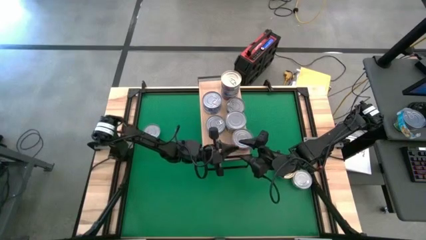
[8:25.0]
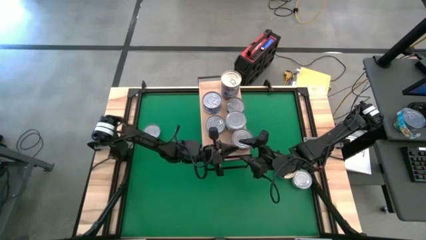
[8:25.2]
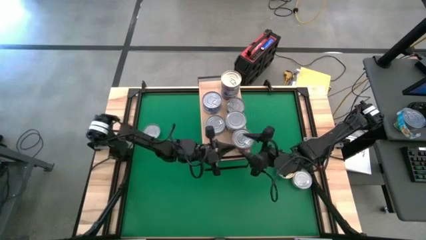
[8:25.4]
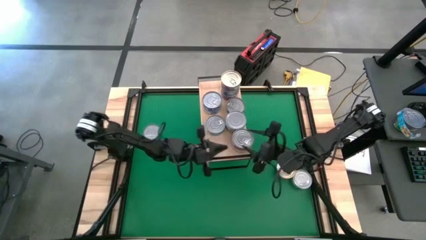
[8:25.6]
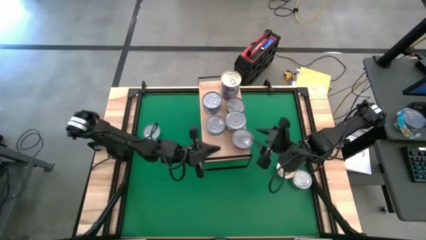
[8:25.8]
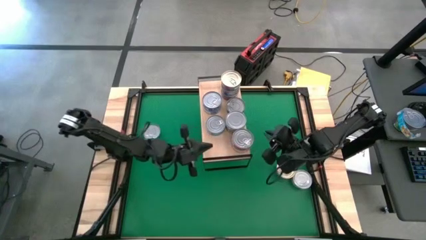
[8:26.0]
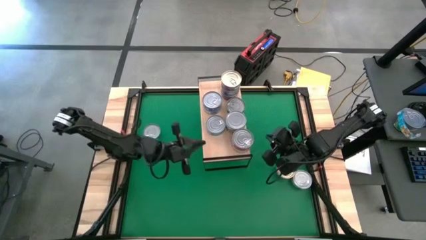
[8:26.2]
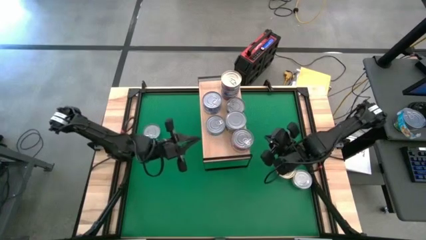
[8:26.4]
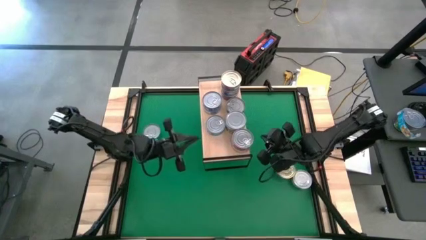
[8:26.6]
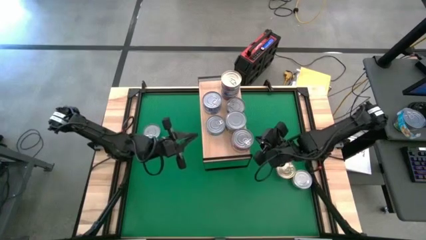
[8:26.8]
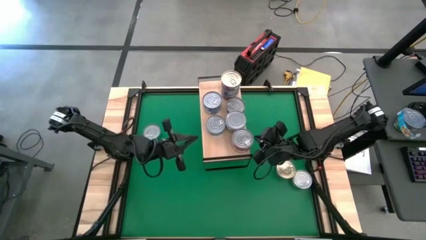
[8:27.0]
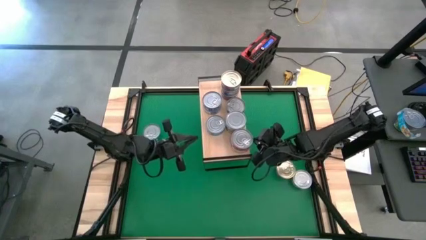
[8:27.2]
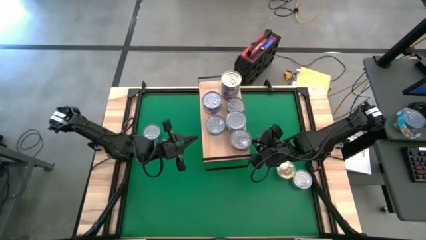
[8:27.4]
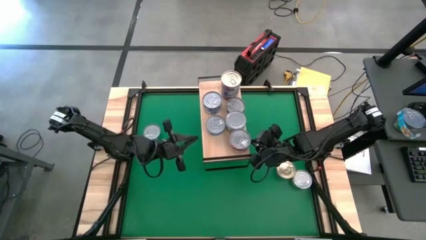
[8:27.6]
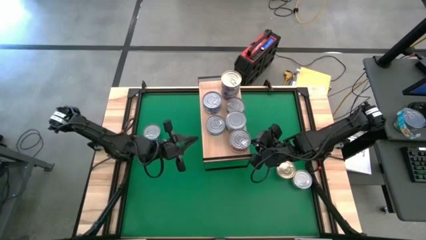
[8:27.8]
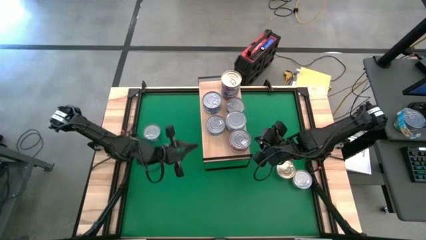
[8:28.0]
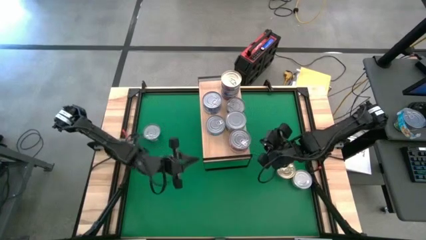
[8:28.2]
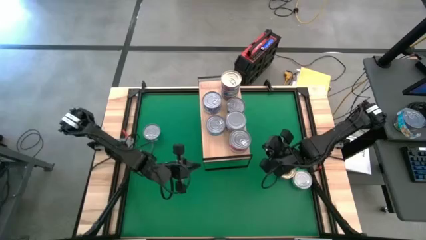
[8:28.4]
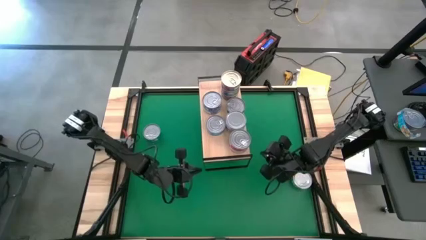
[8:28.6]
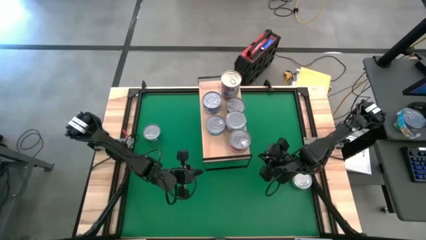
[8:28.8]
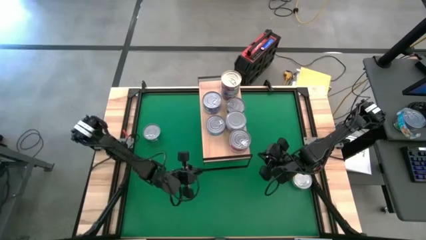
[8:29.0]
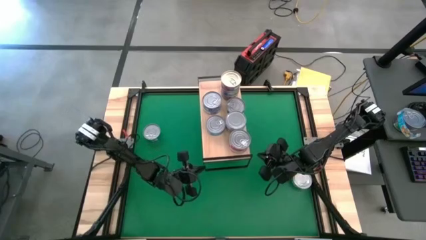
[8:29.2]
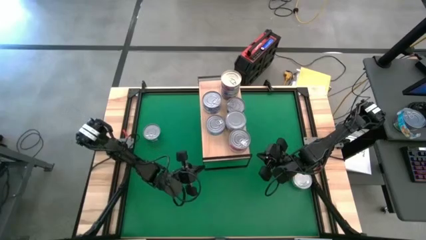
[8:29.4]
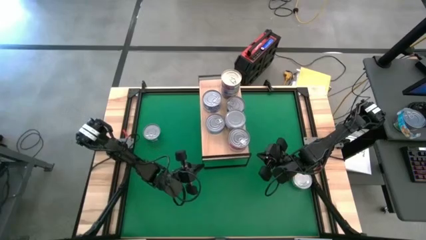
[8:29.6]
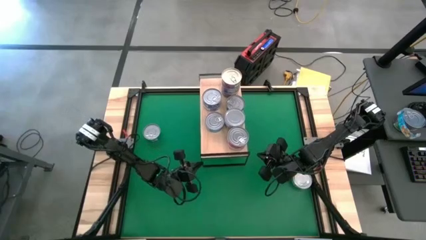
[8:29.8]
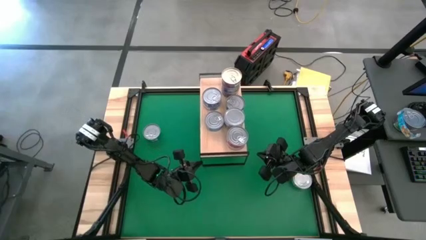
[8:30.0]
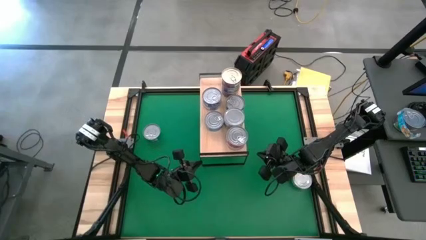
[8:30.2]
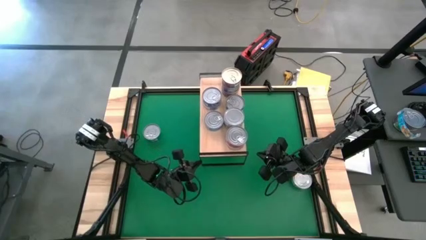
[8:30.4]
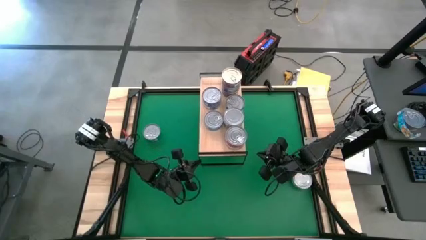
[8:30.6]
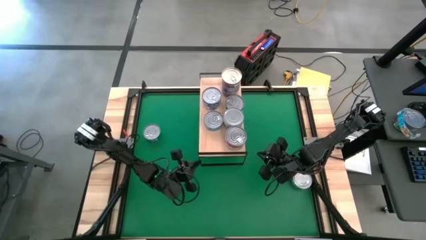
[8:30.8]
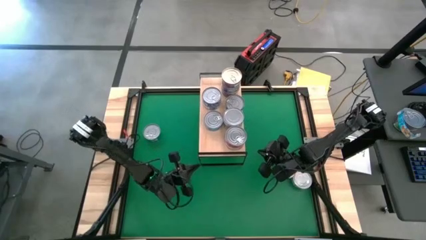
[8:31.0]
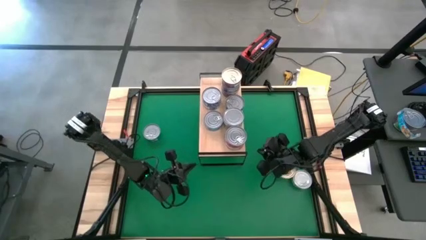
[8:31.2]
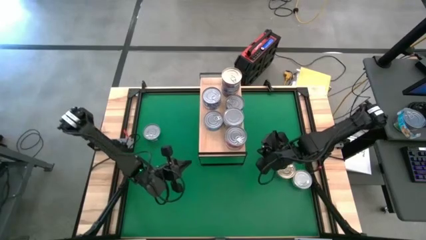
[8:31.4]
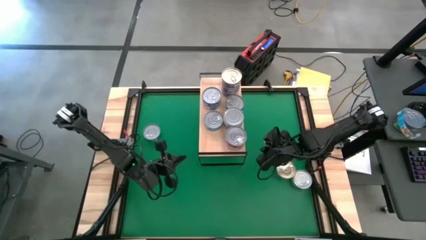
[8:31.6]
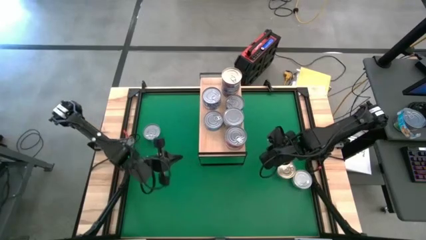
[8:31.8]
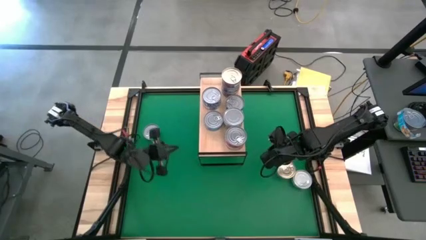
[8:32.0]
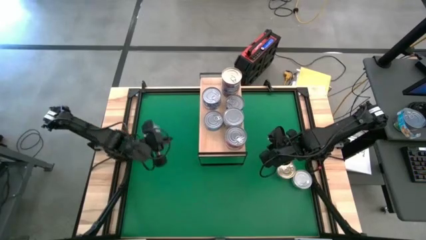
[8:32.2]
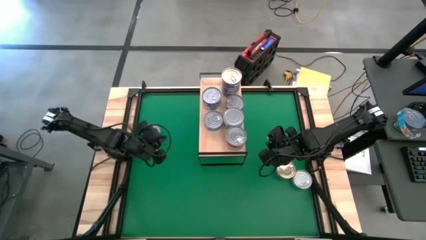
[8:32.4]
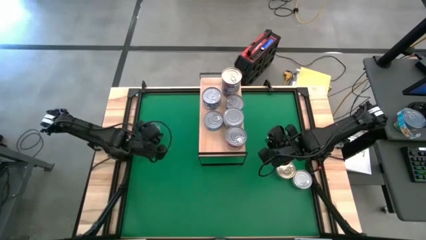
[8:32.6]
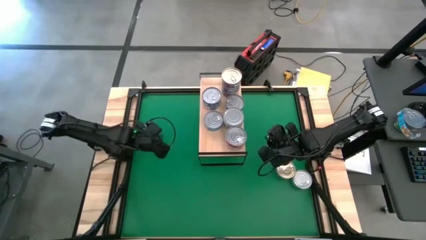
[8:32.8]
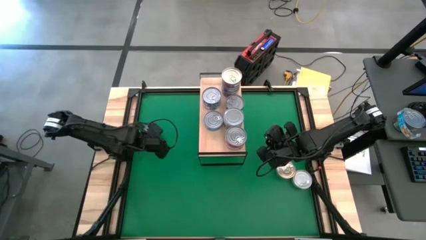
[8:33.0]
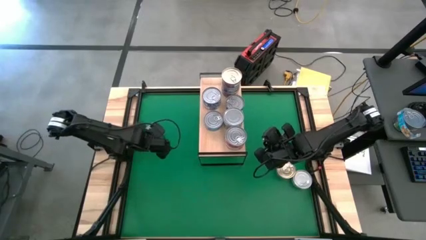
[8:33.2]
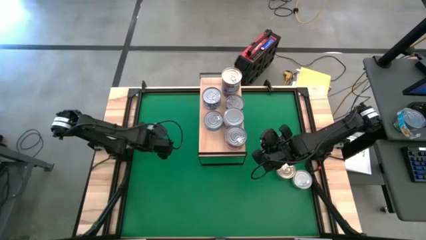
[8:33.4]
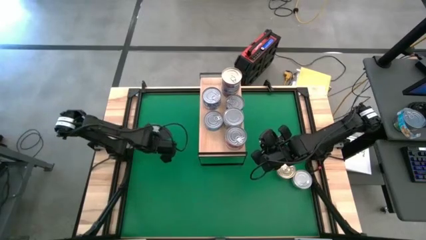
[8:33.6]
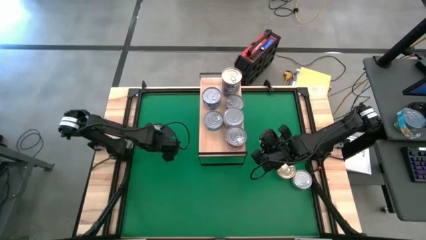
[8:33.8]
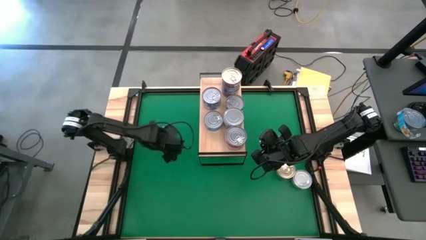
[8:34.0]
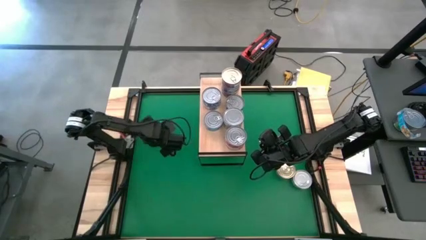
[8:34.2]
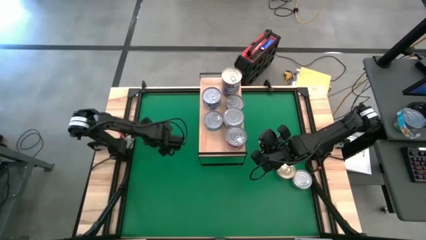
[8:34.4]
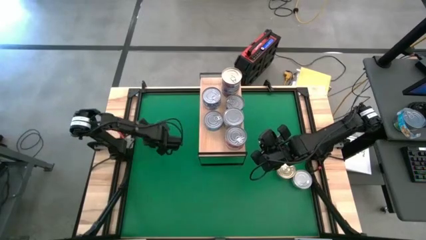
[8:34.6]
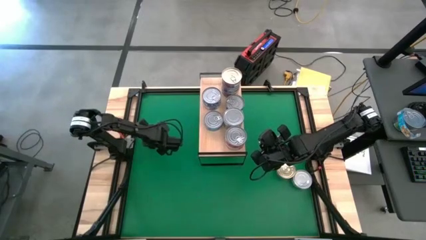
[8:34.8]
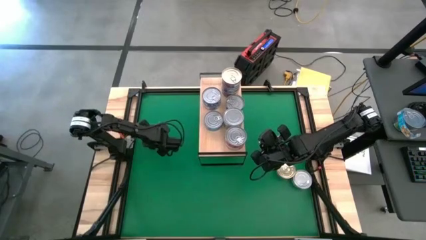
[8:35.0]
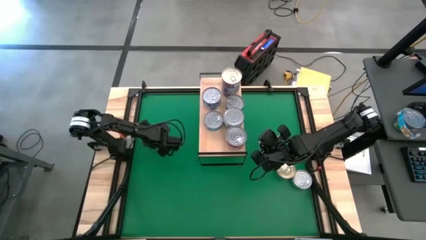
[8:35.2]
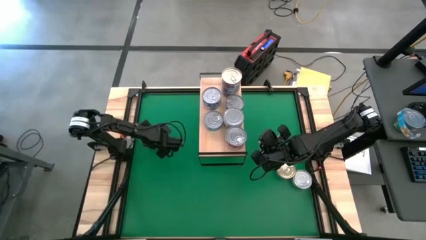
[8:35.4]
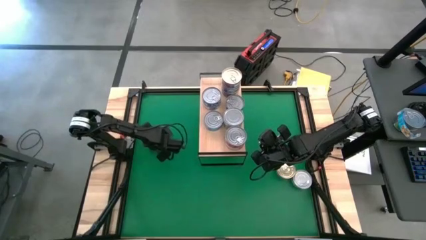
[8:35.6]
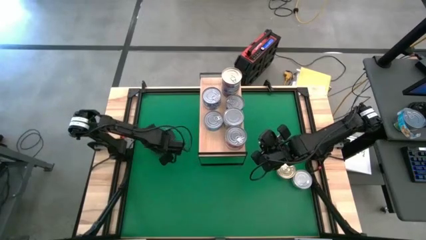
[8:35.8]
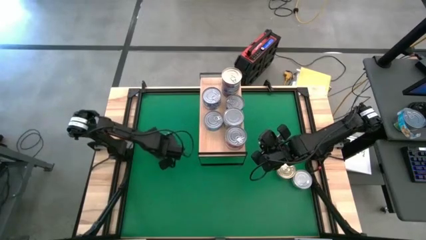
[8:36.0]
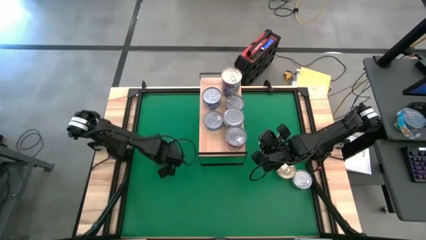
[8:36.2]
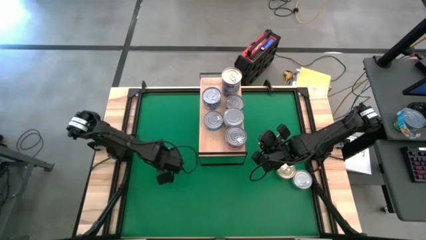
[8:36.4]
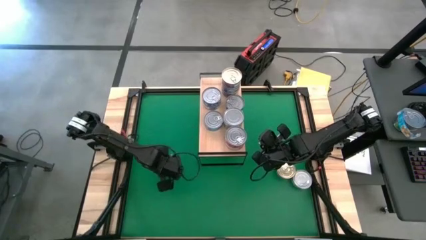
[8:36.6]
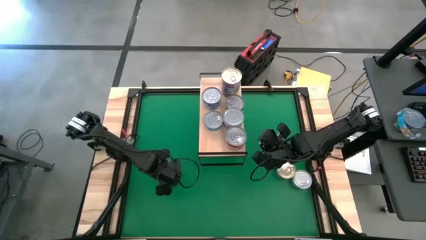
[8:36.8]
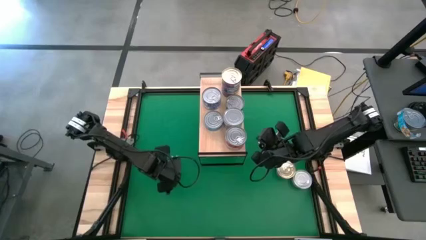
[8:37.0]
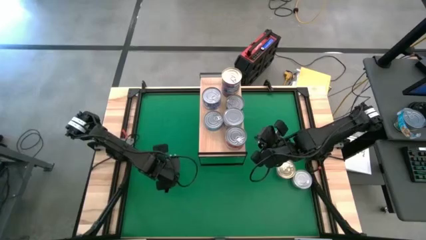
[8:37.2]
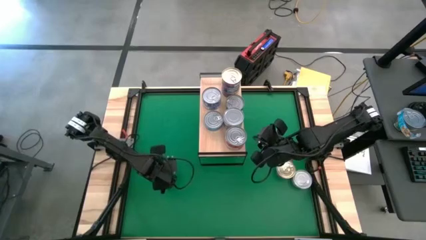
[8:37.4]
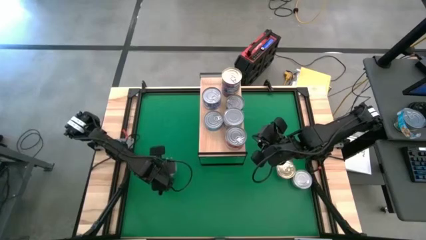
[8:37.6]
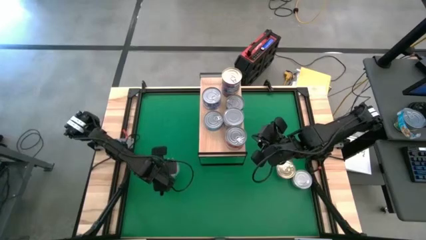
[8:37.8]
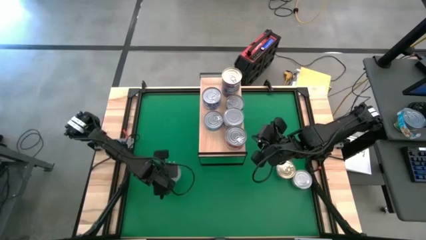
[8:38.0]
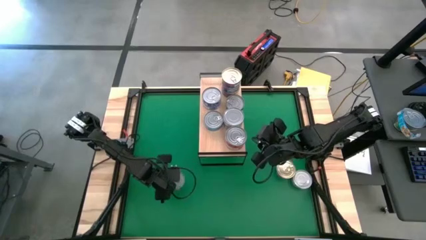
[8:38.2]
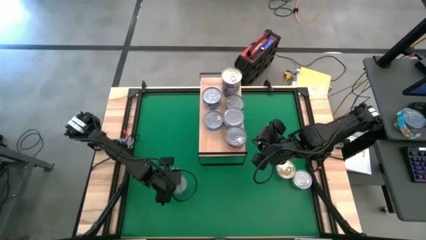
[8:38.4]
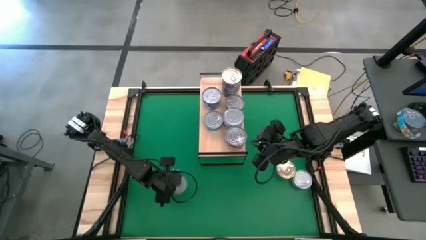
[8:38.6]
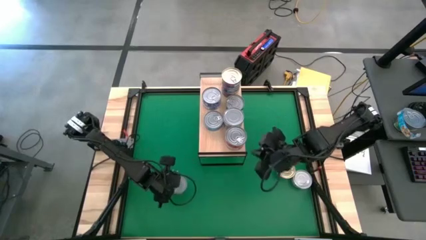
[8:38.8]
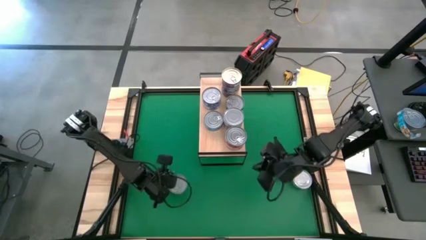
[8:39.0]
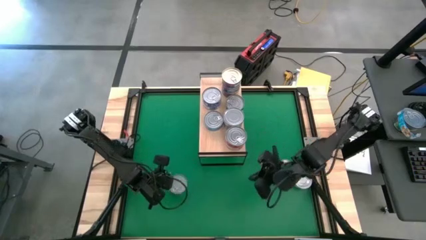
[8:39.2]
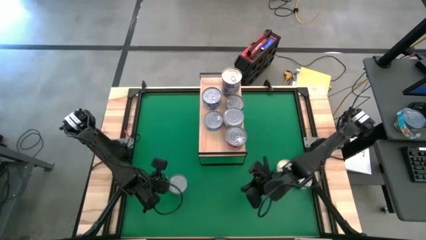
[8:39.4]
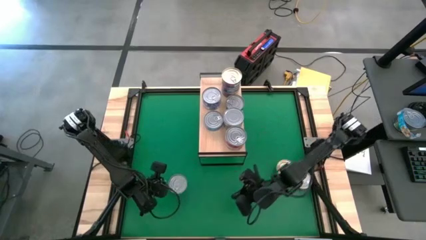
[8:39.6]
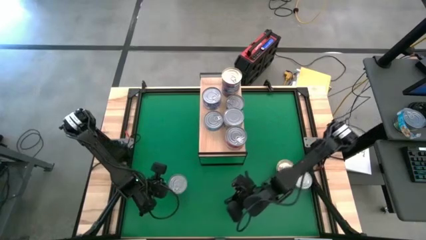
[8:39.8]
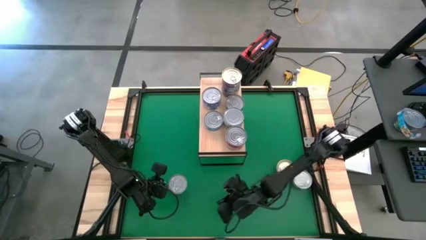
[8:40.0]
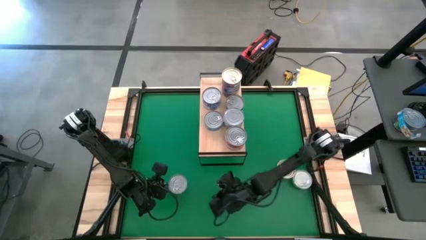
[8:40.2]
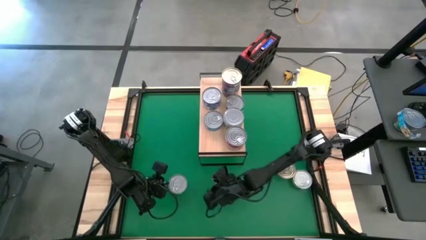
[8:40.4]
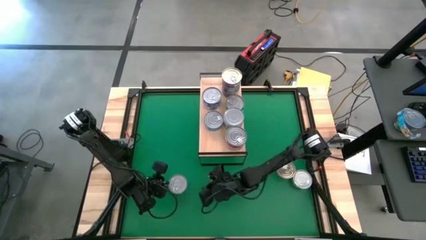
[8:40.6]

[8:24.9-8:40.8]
Task: Stack canned seafood by type on shelf
Stack the light blue tuna can on top of the light blue can on the shelf
